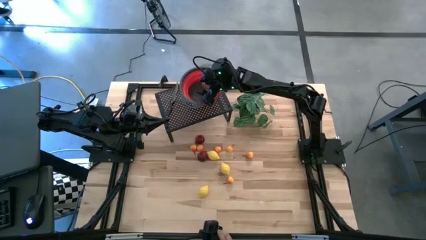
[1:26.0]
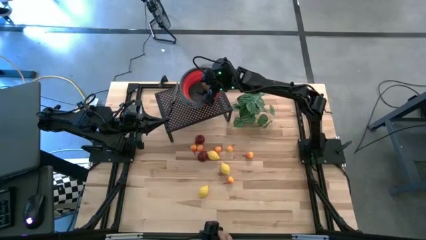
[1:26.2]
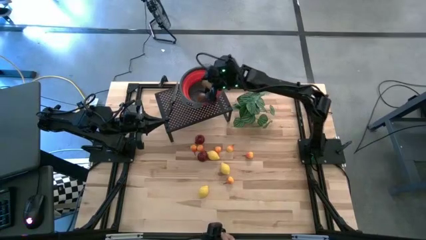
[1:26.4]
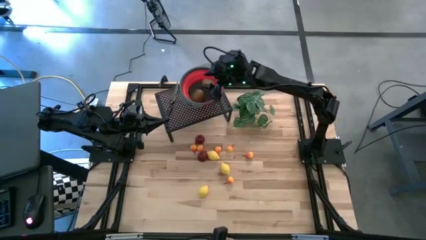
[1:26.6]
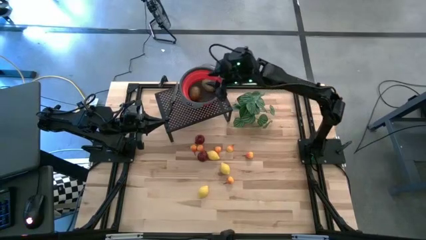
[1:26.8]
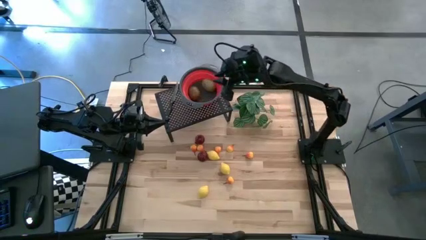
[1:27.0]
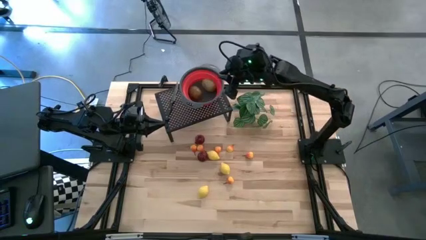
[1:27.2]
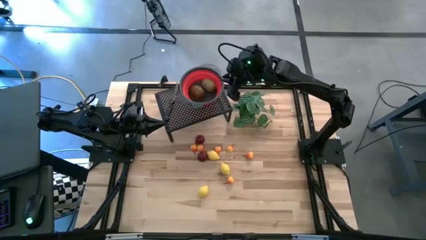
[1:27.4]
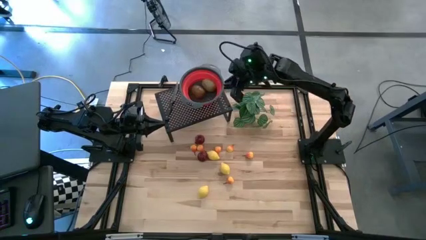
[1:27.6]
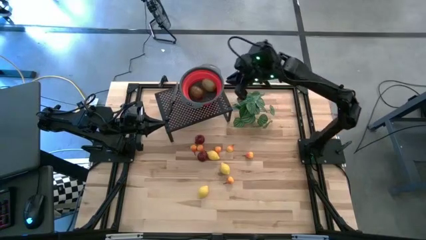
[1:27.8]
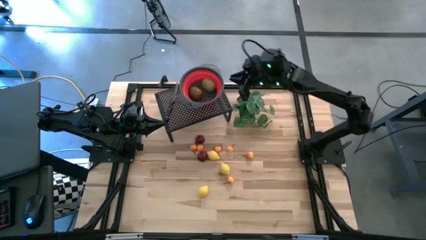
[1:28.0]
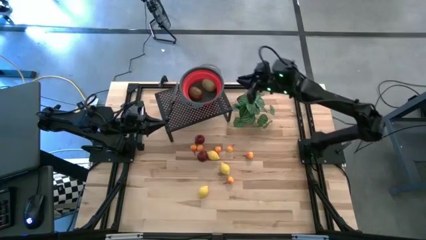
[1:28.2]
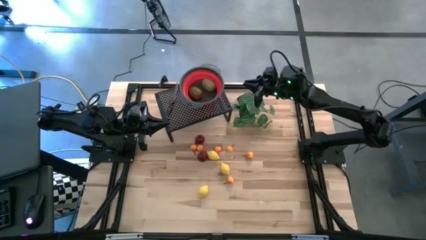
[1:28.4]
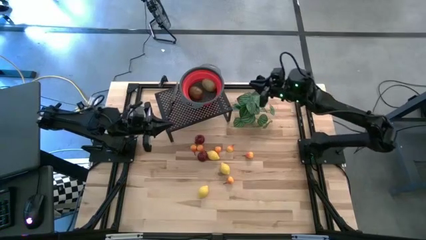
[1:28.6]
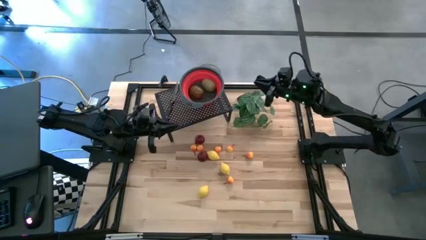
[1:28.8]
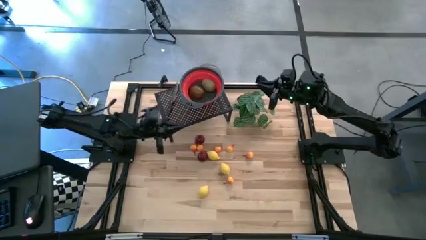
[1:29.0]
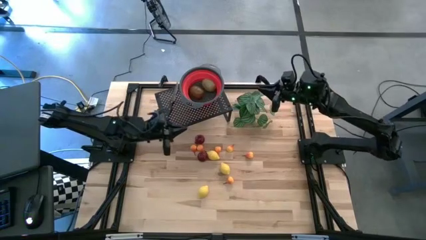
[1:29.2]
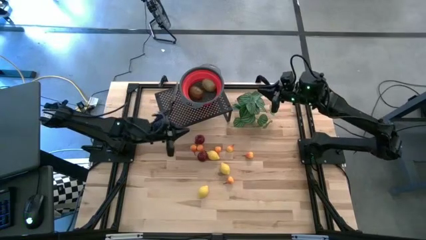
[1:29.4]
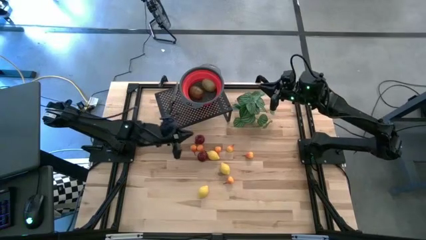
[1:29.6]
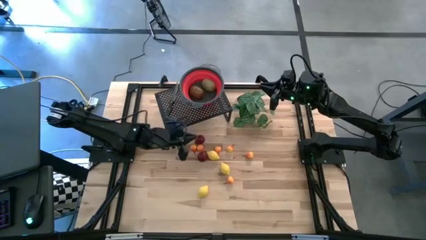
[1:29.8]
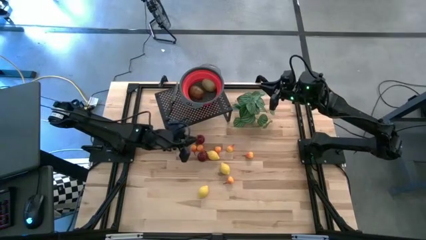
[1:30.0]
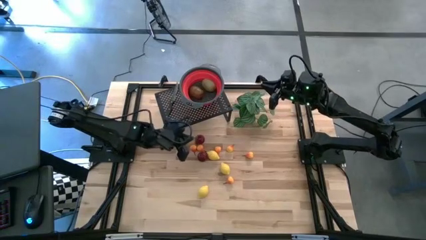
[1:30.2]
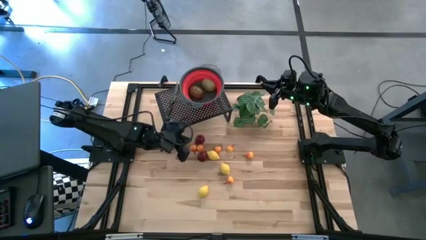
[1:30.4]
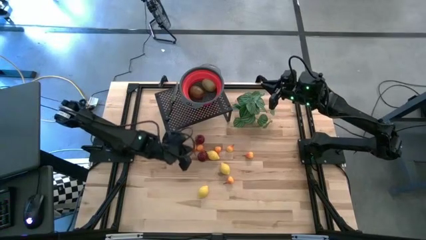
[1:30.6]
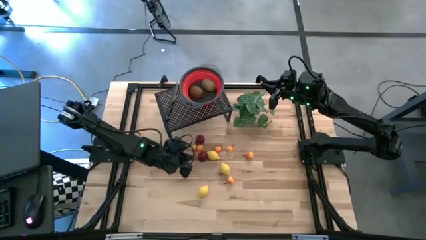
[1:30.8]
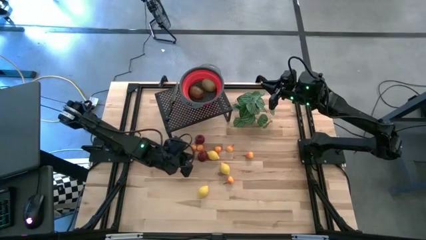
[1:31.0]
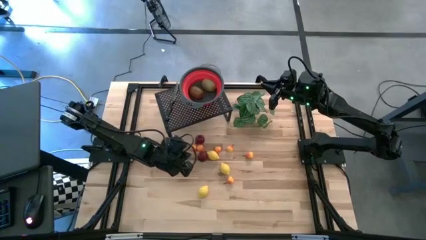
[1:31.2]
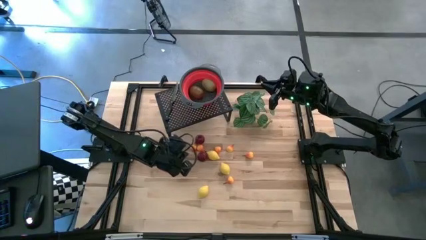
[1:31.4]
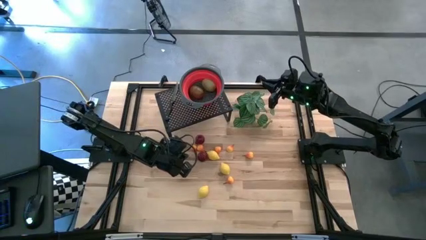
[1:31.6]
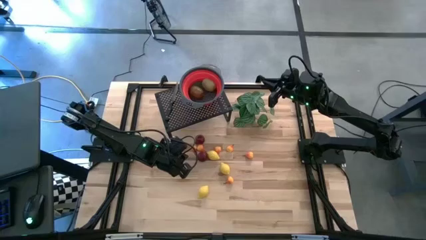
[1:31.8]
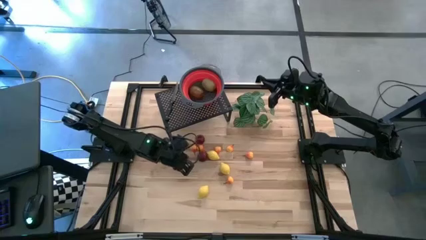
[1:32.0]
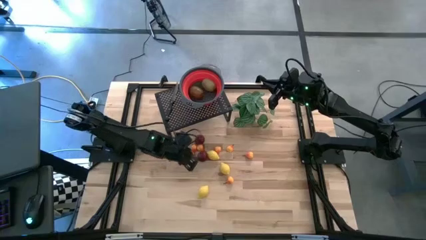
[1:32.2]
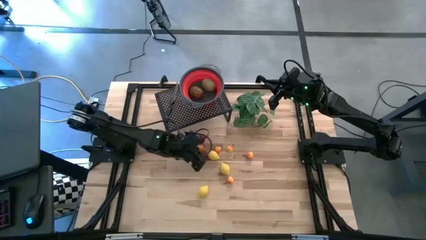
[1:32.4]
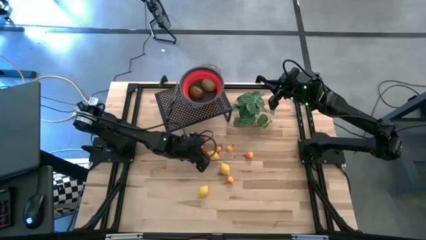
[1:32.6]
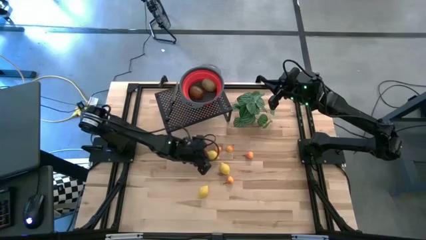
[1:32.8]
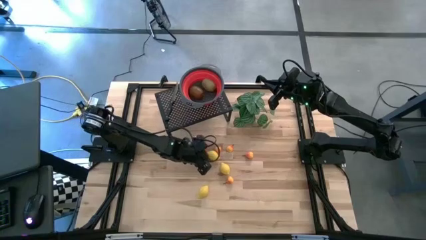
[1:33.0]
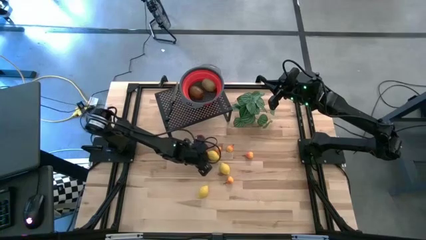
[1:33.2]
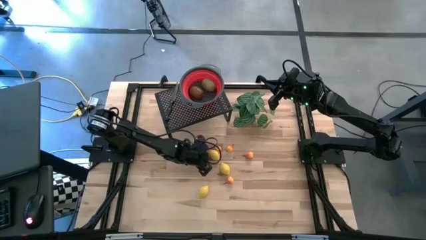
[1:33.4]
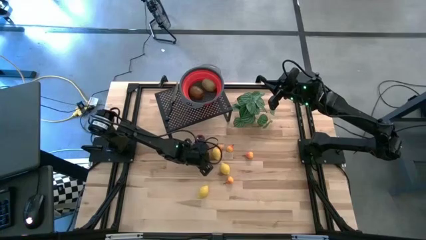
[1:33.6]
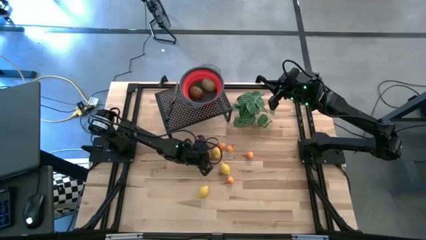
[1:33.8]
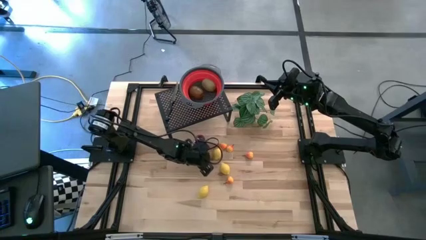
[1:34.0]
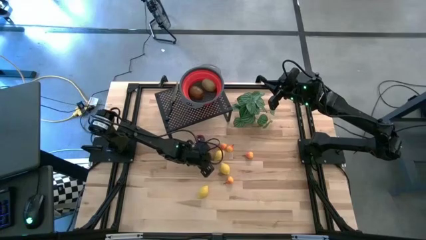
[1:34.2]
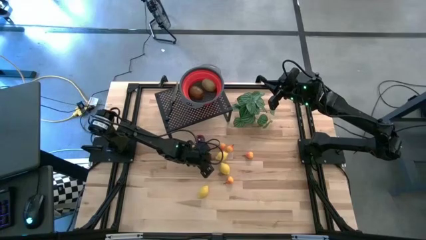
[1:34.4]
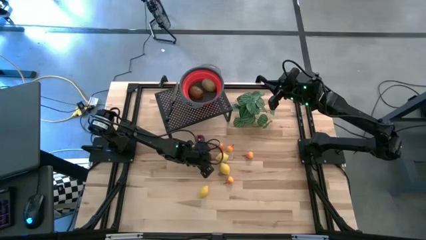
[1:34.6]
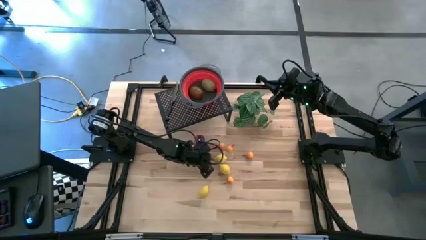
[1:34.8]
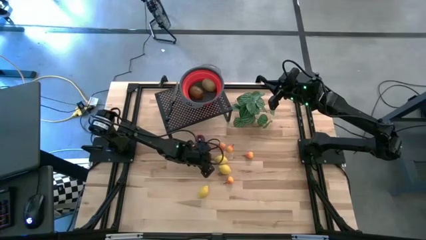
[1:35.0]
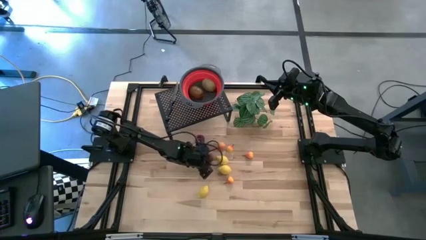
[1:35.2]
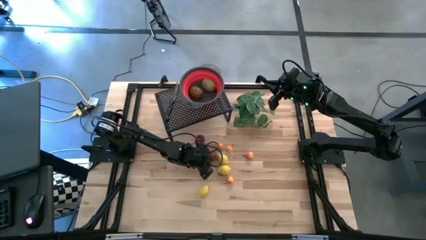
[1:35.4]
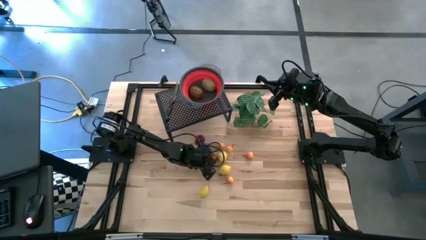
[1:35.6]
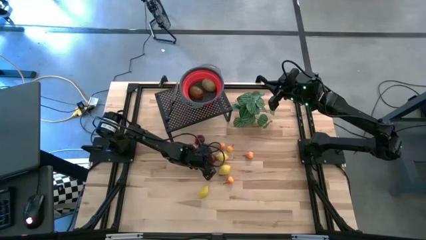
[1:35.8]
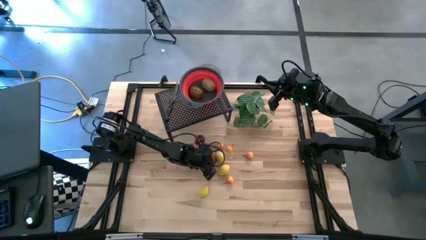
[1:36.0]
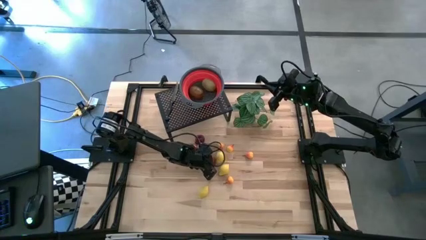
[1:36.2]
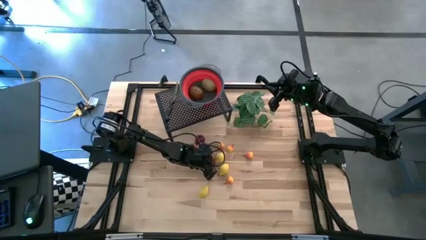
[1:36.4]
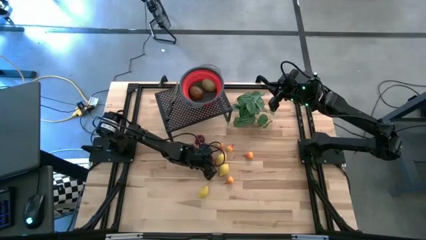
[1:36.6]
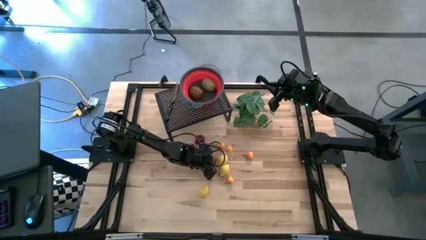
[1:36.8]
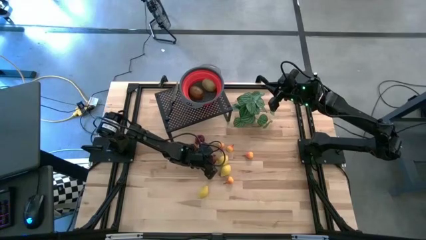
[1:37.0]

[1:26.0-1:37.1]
Task: Pick & Place Fruit
Put the bottom red pomegranate into the red basket on the shelf
